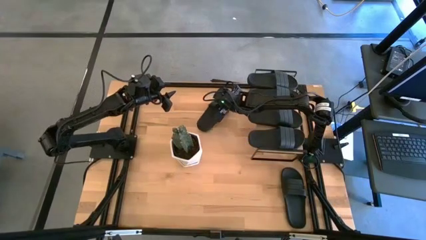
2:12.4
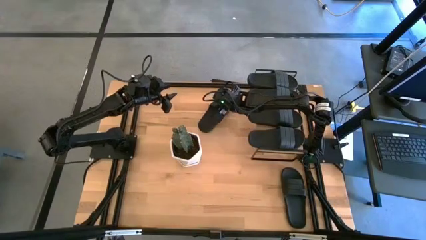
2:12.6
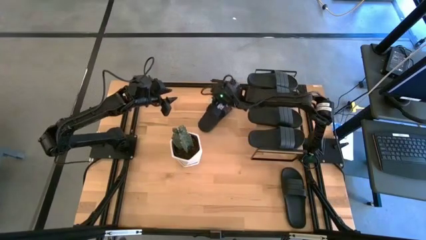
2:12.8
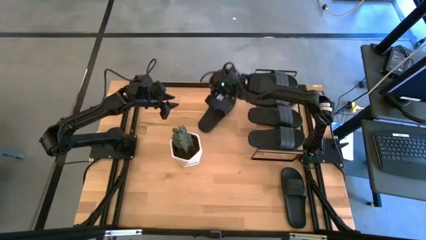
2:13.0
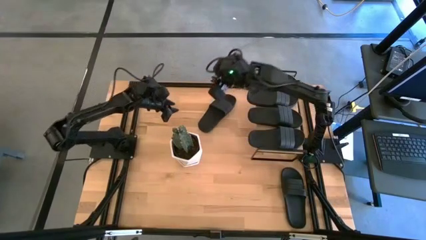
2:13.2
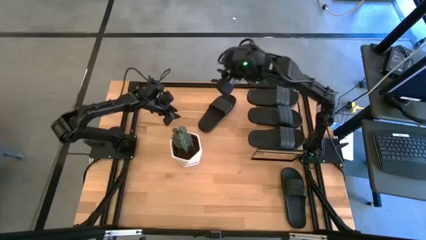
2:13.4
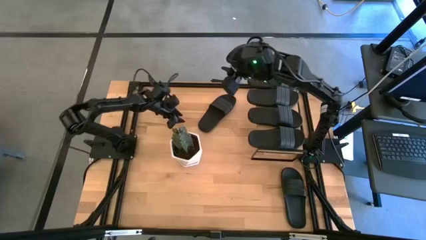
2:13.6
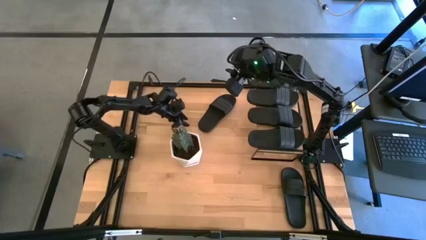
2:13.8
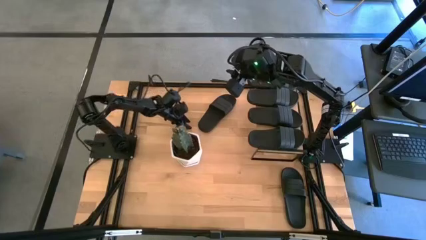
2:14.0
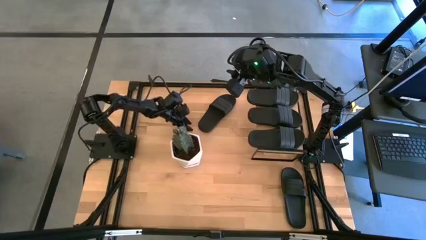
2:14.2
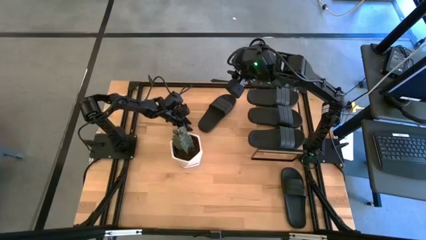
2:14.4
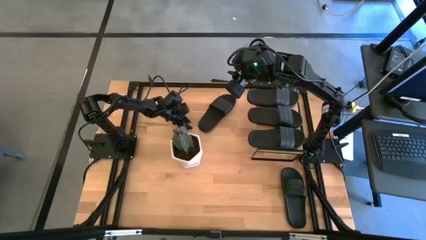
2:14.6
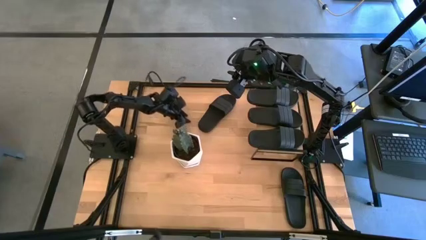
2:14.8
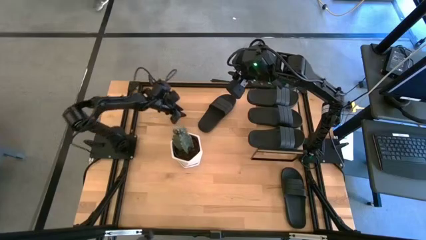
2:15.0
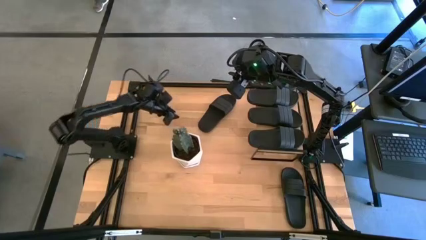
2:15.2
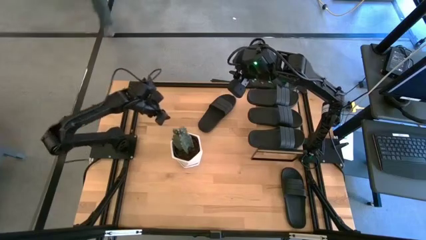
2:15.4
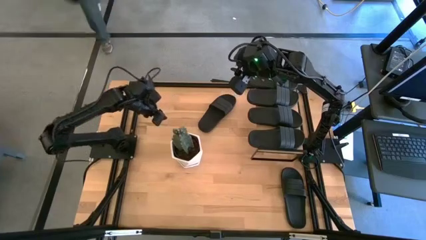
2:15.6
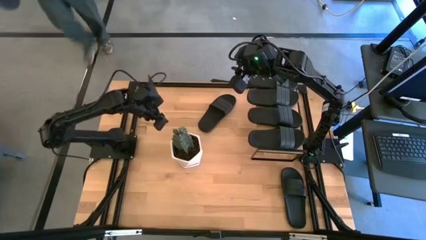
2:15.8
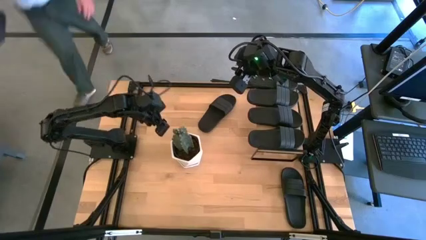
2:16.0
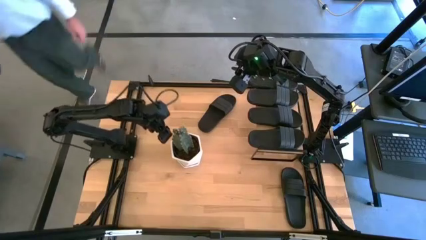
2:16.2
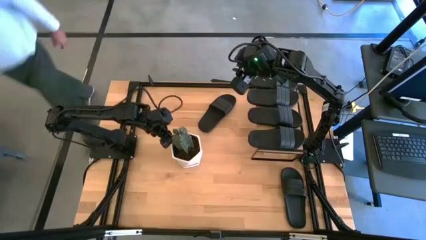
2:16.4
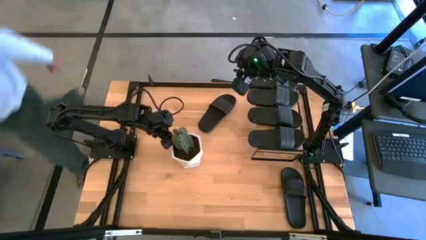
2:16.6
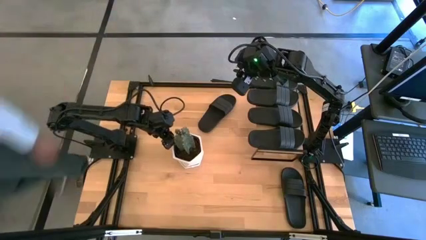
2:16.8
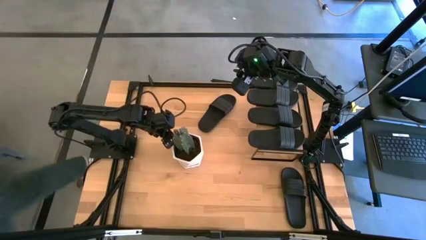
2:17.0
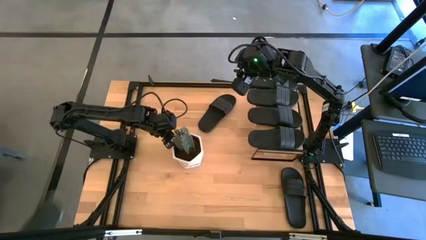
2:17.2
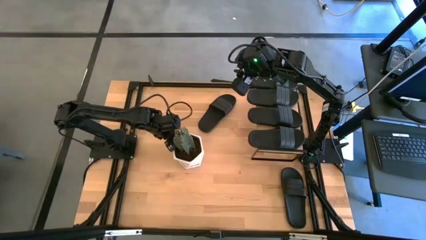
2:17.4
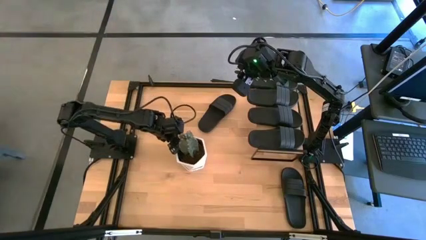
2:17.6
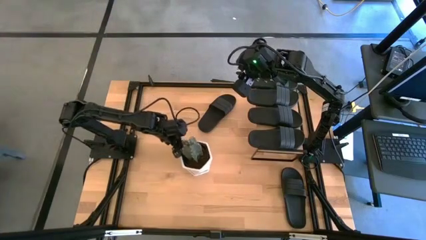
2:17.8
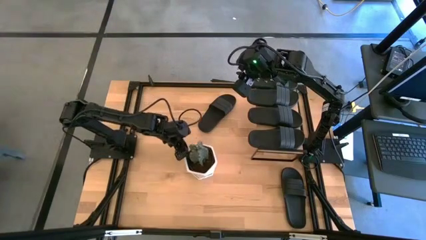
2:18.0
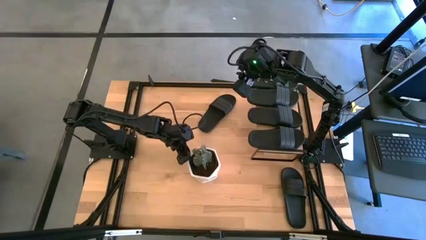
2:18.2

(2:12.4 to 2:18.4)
Task: Pick and place slides into the shelf
Move the potted cactus to the bottom center of the table

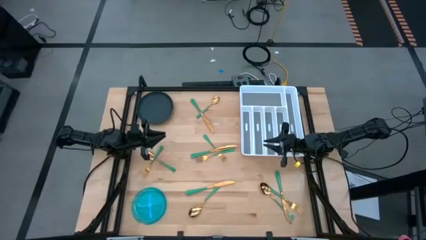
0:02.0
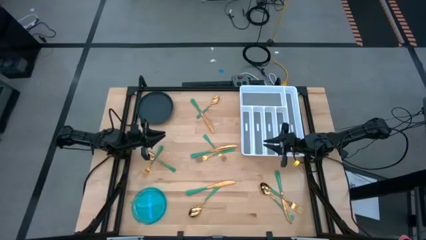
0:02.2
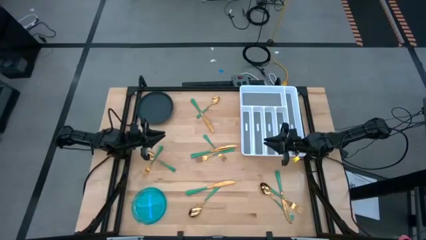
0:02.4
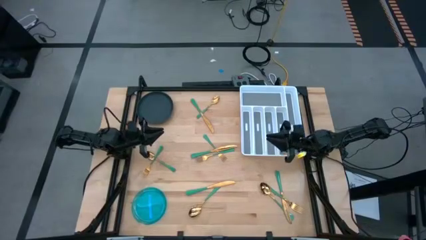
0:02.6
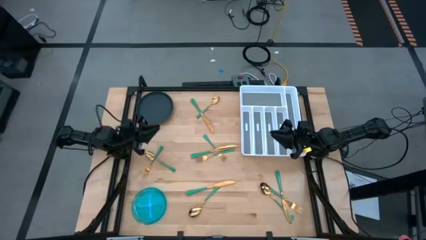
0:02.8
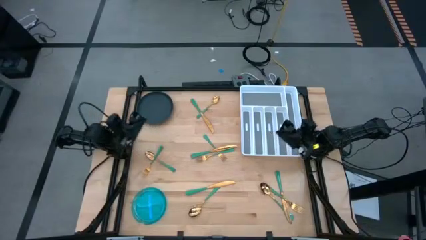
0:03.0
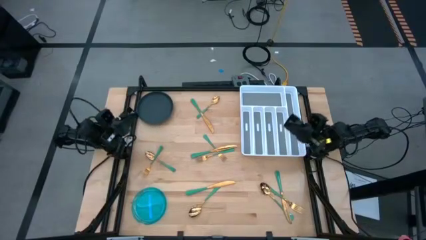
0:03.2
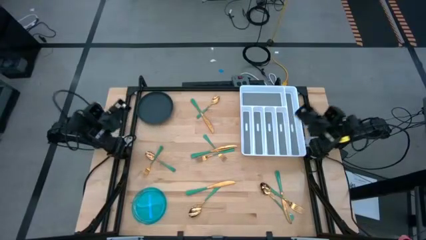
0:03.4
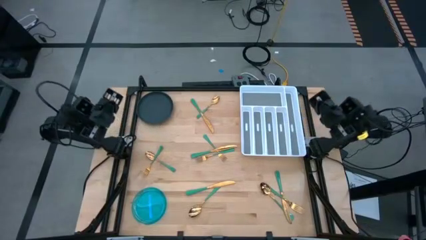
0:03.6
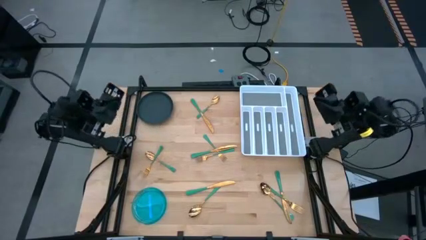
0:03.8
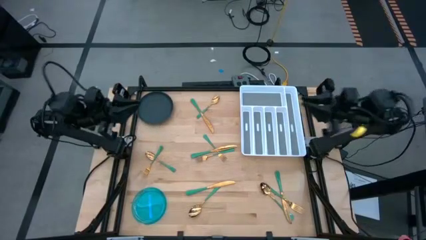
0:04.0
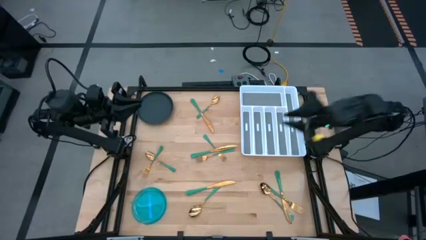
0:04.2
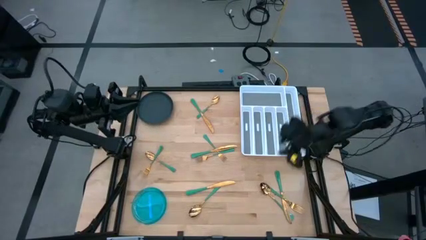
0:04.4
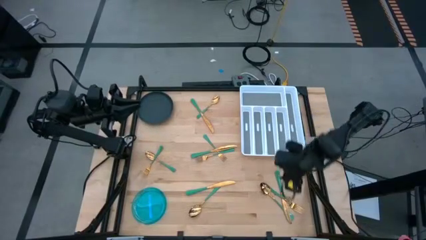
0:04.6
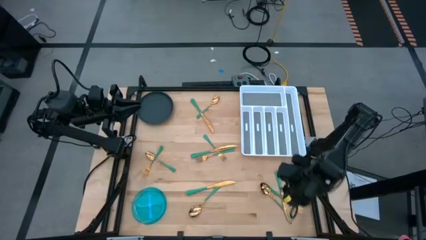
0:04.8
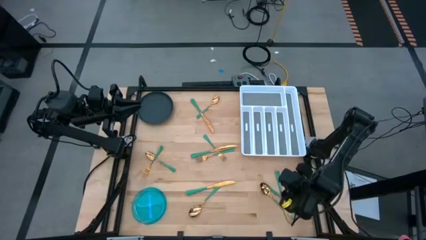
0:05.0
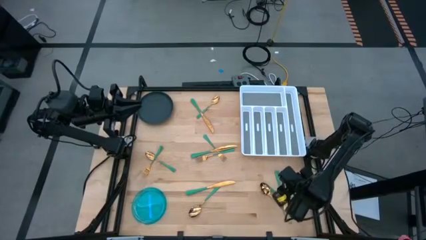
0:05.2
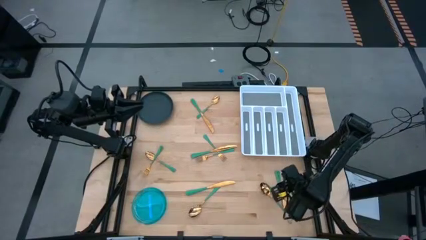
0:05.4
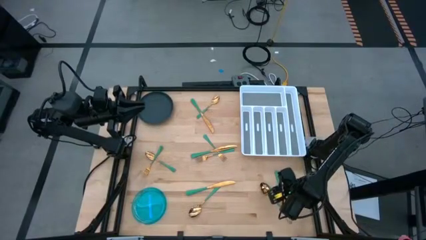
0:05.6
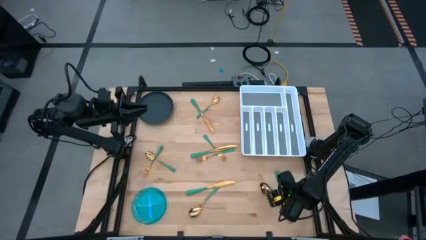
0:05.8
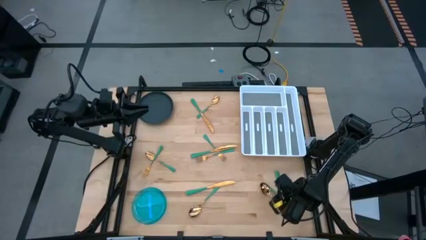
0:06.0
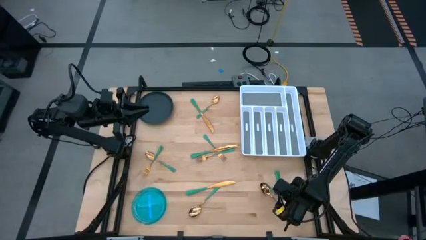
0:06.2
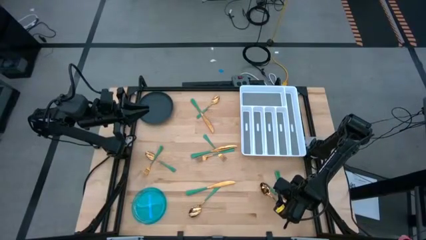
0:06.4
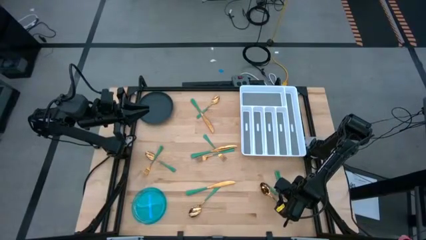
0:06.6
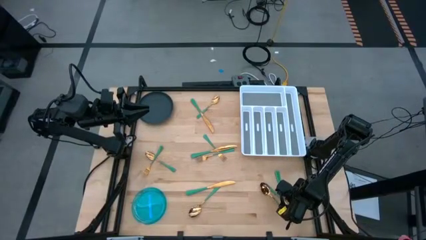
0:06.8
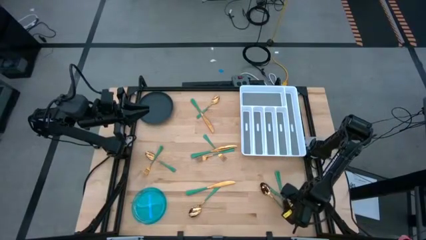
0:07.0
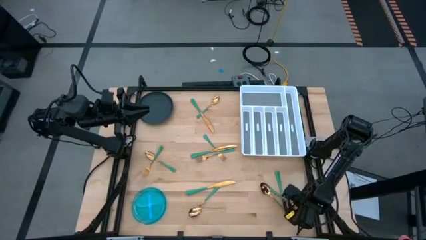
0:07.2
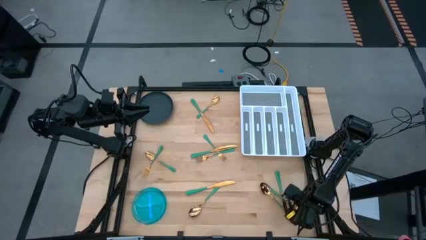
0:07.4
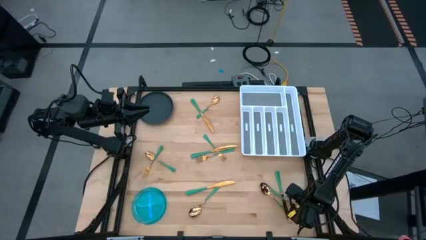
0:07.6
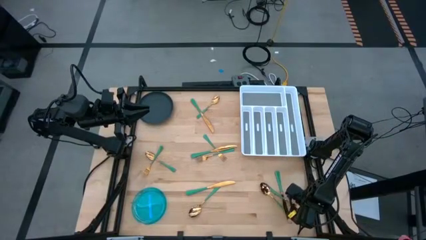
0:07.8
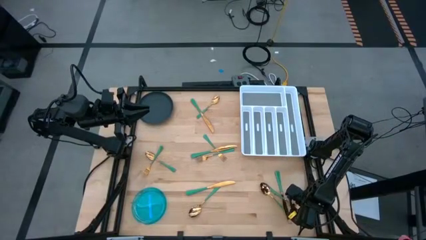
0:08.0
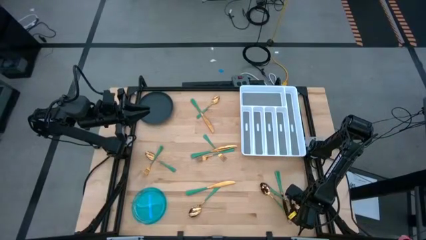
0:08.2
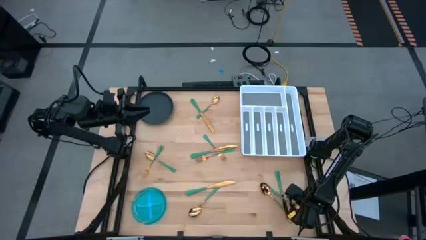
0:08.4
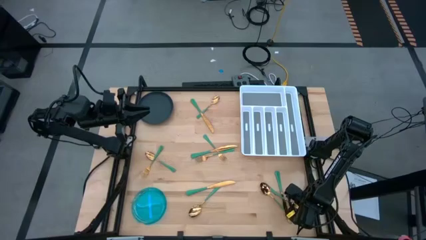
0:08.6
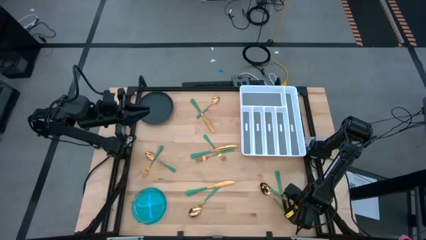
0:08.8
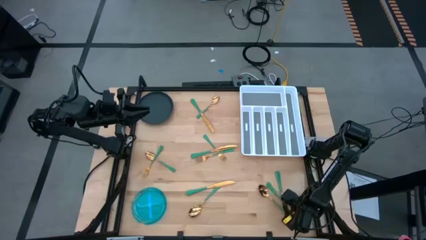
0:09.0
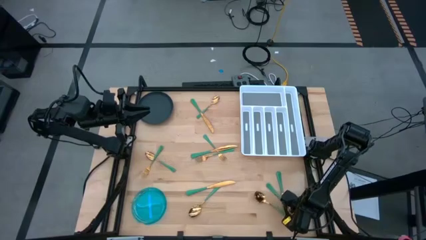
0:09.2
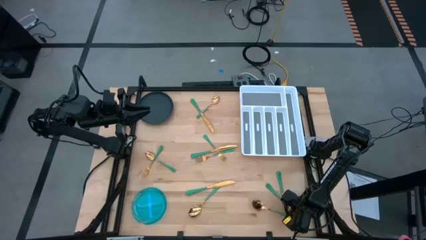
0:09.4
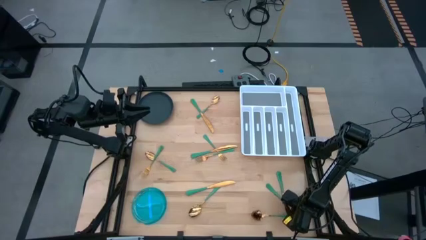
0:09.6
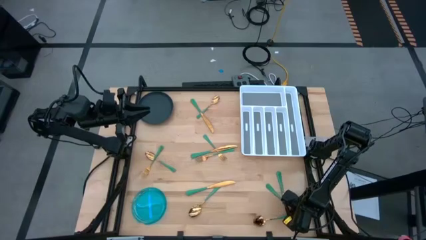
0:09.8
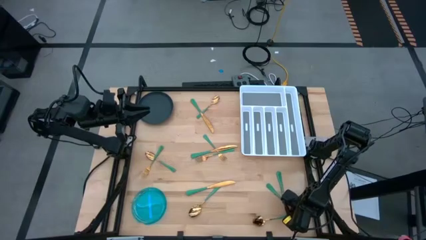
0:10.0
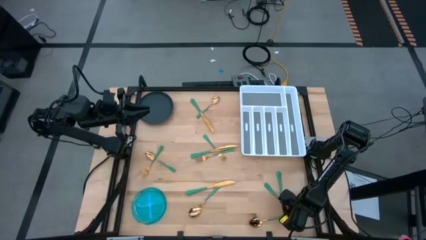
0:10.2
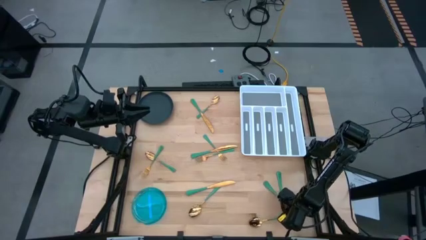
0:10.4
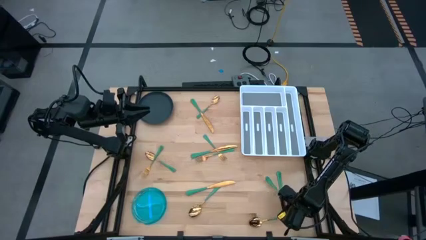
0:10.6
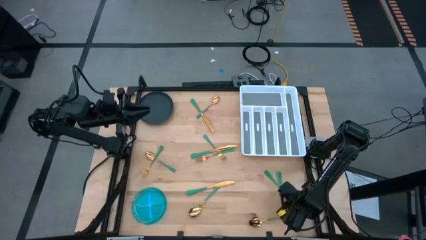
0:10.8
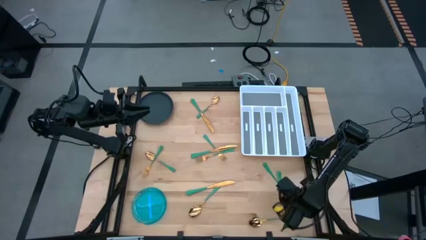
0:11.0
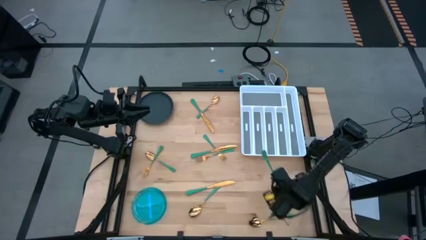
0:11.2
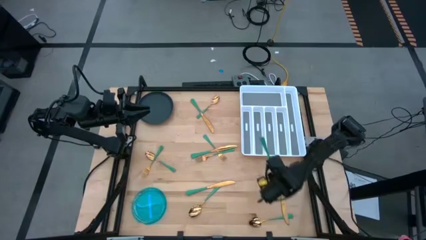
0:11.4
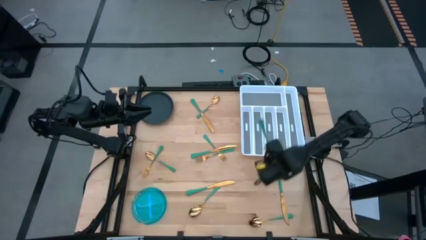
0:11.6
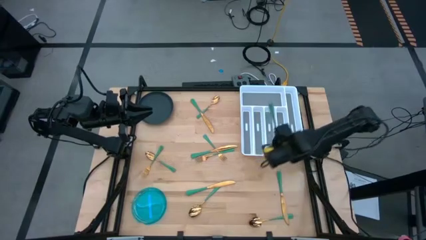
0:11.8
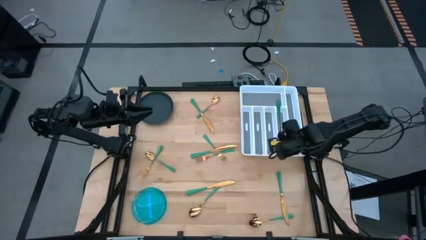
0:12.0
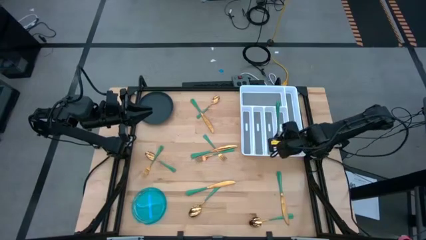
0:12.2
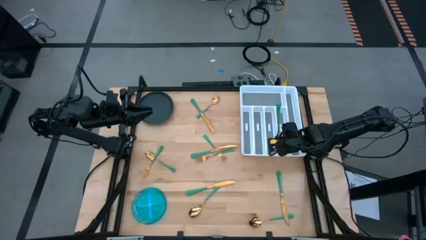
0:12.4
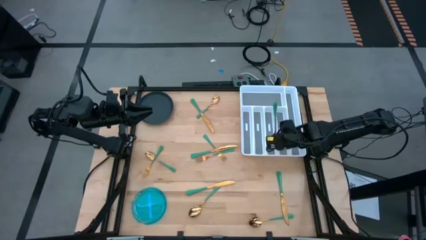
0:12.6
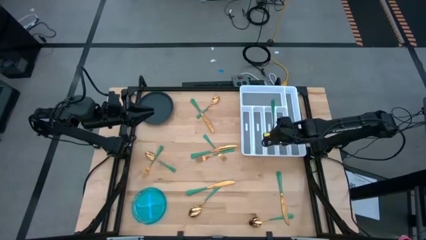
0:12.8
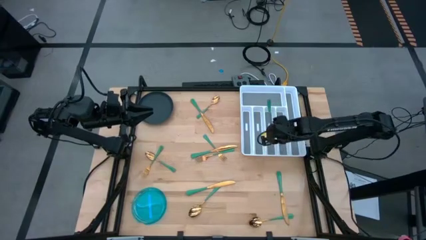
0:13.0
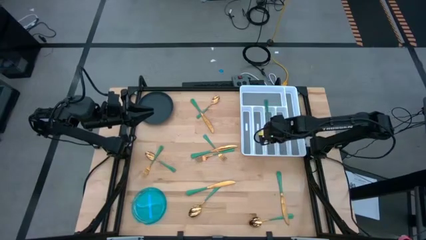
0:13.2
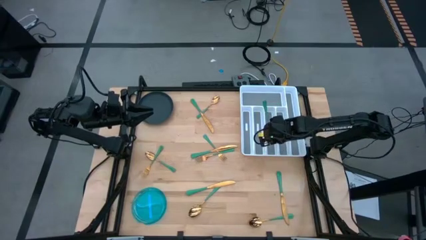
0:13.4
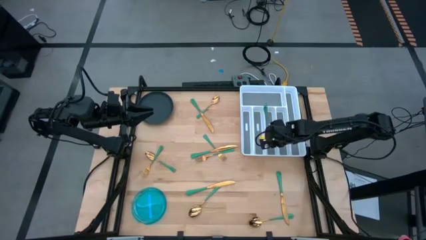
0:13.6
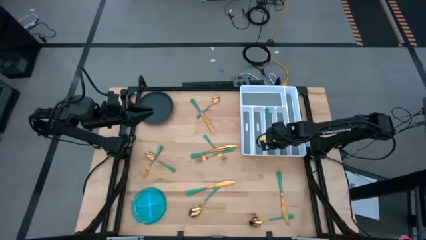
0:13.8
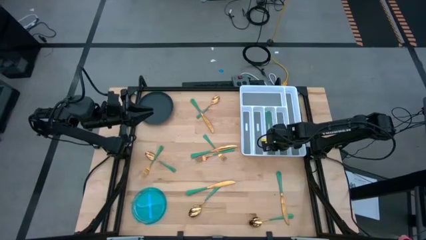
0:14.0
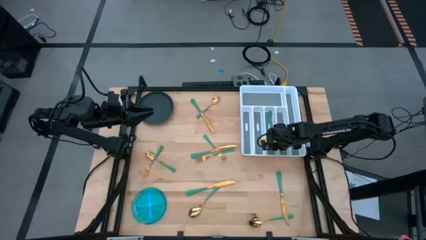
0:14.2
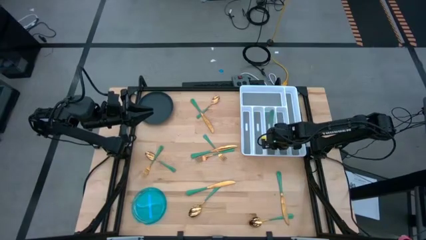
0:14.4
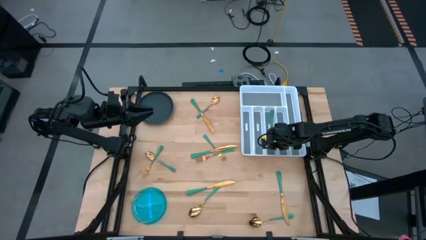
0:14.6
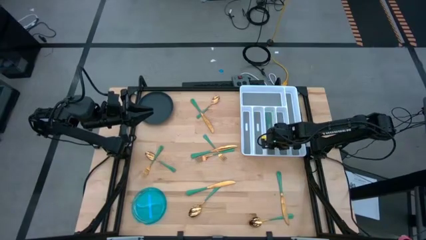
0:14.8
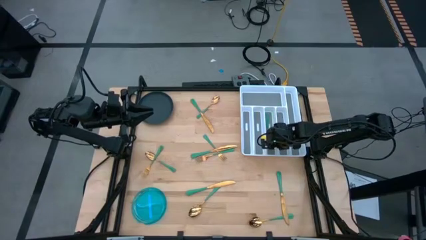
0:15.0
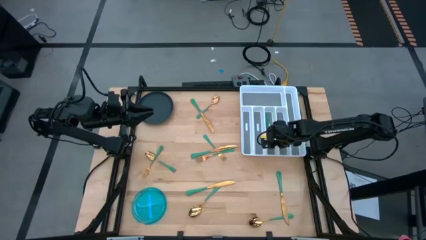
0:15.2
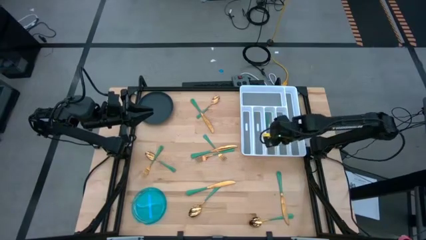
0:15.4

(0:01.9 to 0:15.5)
Task: Sort silverware
Put the bottom right green fork into the middle right slot of the white silverware tray
